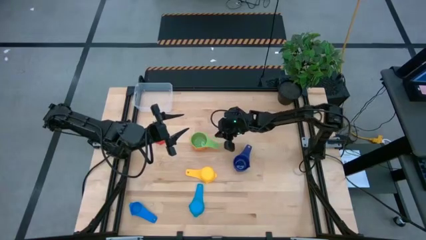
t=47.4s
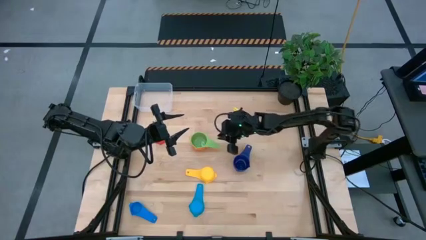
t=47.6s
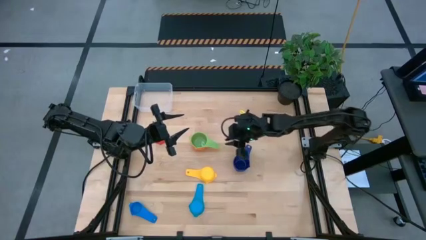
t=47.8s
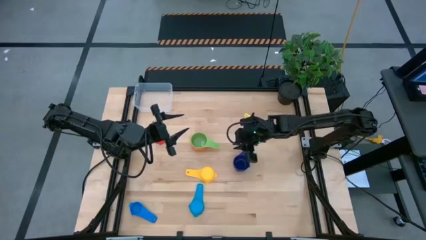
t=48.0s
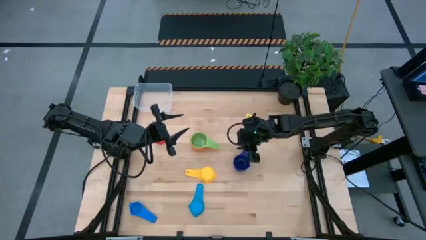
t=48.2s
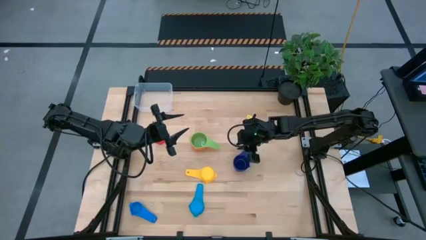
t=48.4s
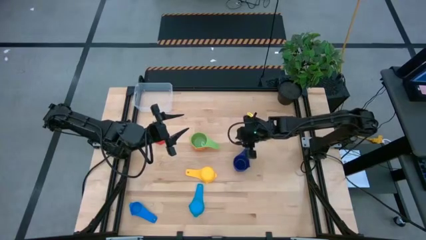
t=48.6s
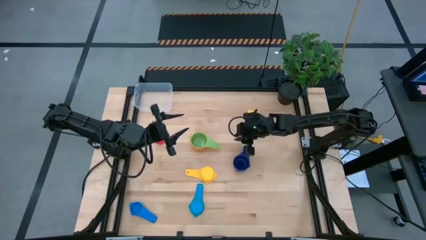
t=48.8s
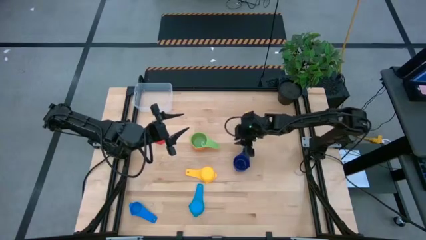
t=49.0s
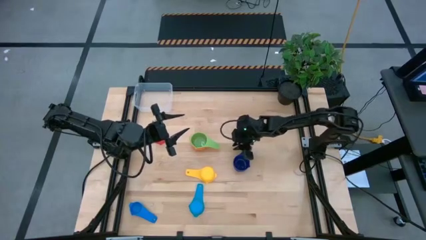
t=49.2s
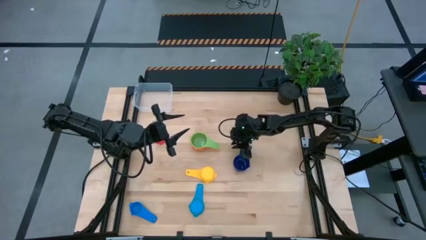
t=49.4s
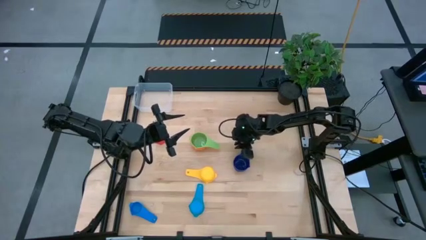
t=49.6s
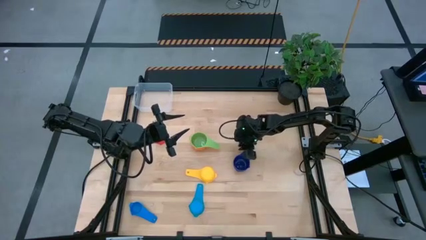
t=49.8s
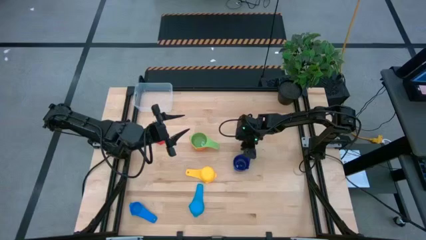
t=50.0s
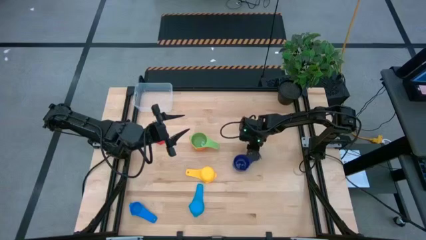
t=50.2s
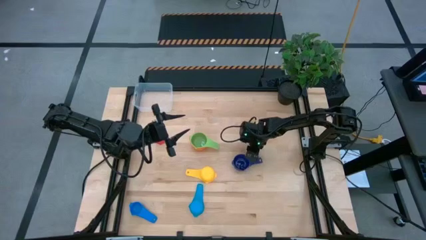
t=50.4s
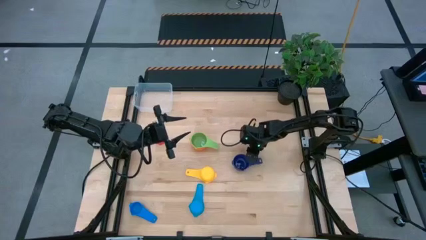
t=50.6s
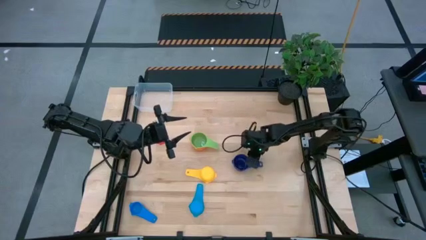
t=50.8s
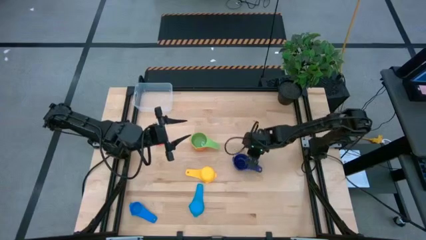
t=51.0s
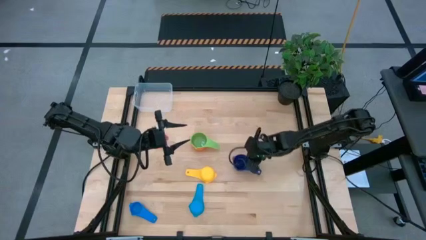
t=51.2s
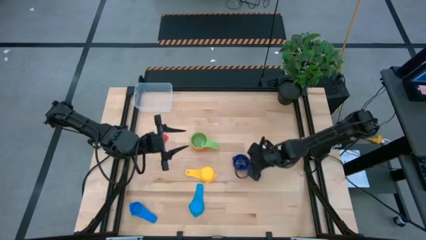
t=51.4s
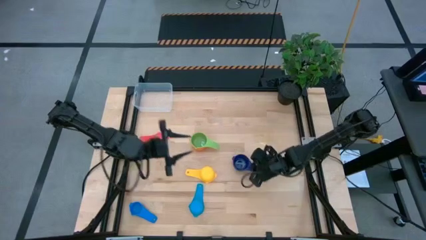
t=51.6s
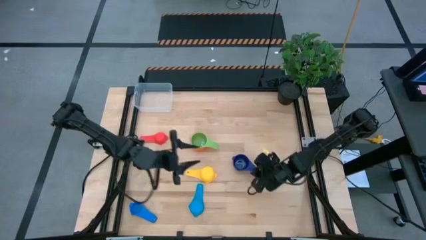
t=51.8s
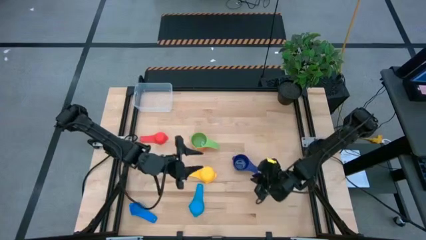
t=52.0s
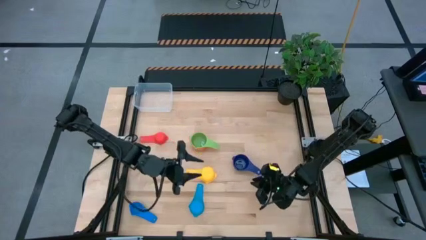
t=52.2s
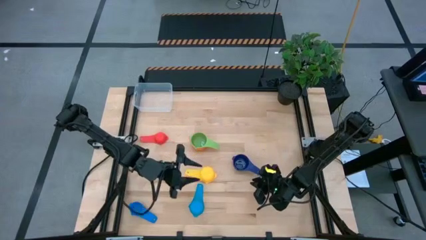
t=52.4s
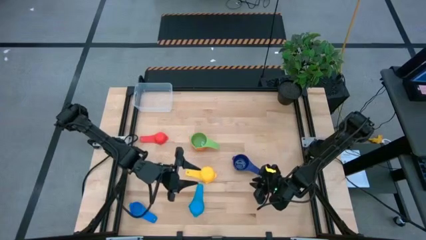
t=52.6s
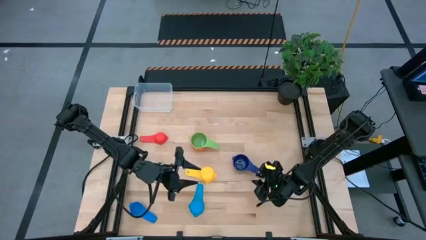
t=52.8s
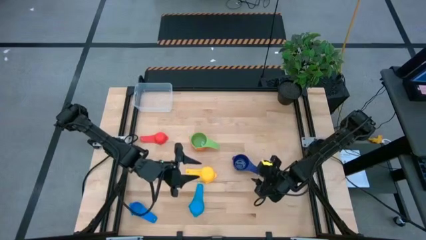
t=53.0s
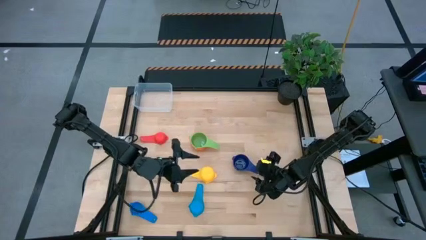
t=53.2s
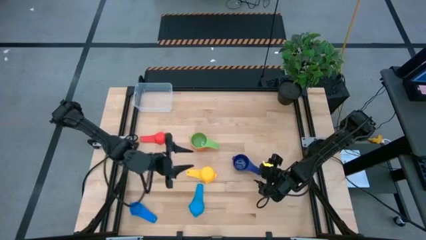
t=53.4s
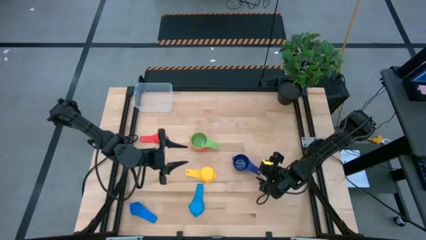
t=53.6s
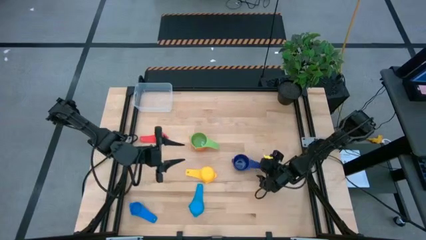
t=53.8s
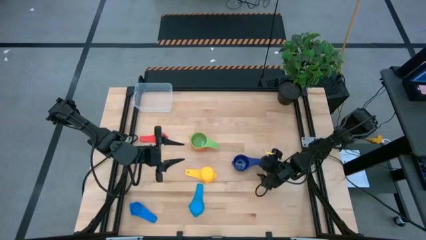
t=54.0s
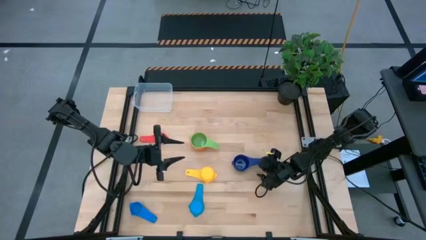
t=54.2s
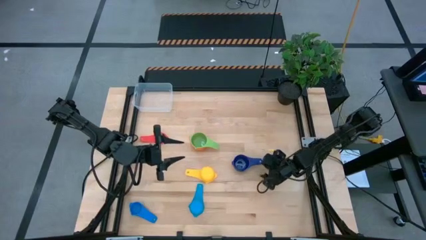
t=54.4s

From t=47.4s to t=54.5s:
Task: Nest measuring cups in basket
Stack the dark blue measuring cup on top of the green measuring cup

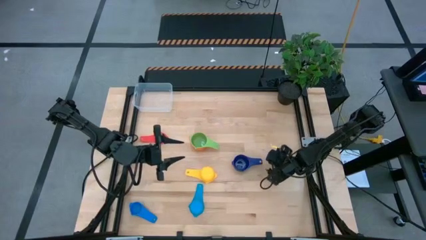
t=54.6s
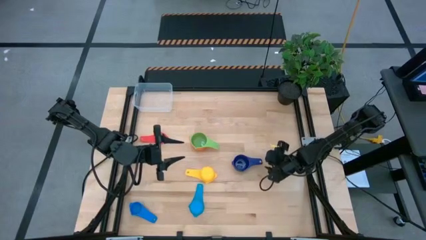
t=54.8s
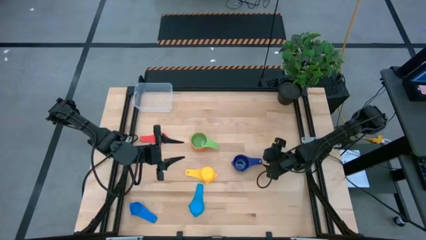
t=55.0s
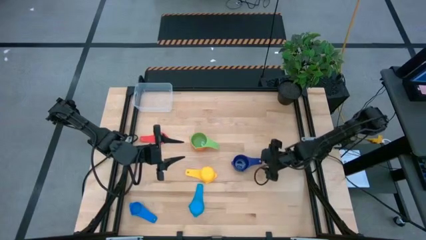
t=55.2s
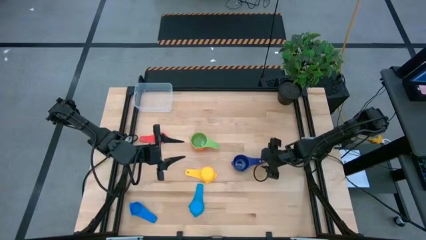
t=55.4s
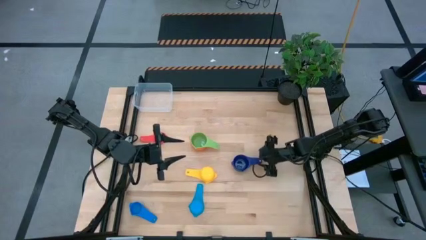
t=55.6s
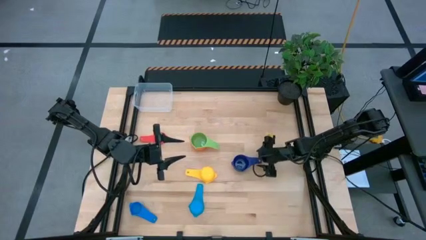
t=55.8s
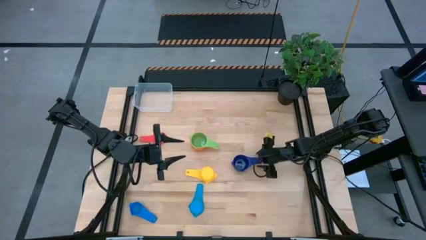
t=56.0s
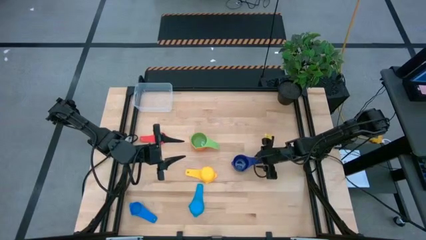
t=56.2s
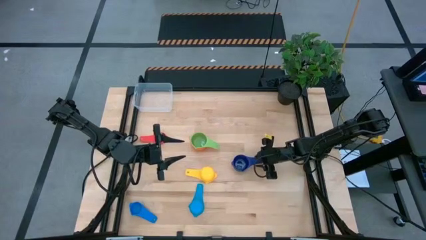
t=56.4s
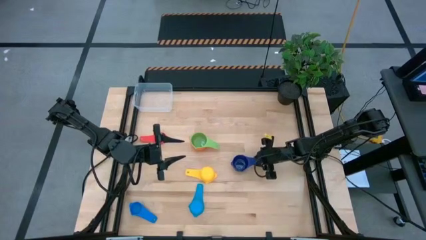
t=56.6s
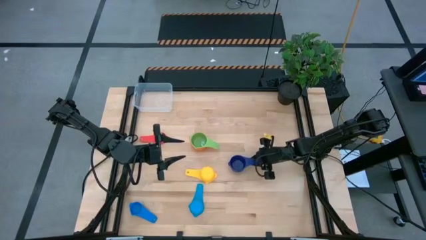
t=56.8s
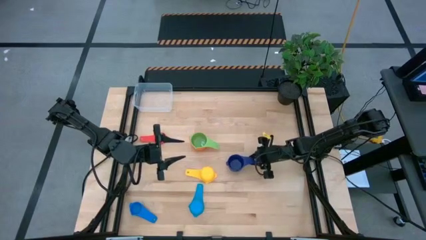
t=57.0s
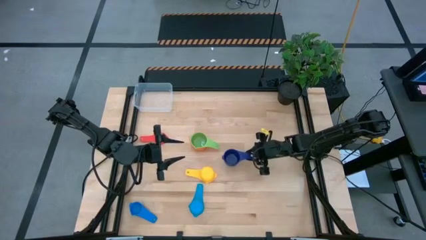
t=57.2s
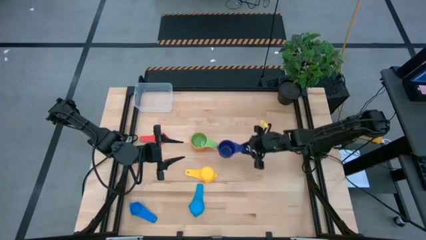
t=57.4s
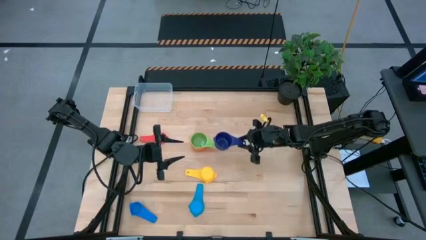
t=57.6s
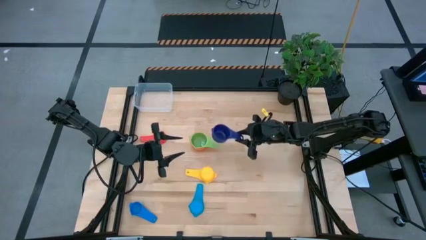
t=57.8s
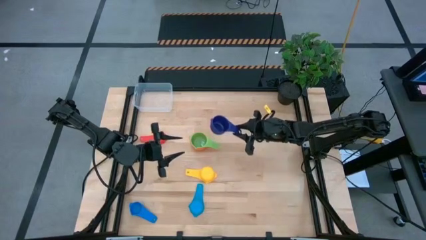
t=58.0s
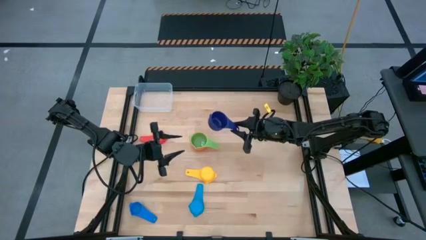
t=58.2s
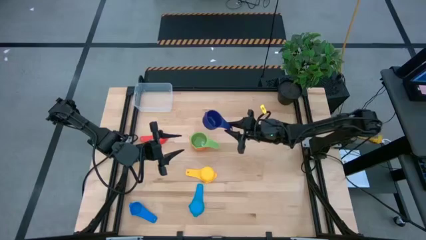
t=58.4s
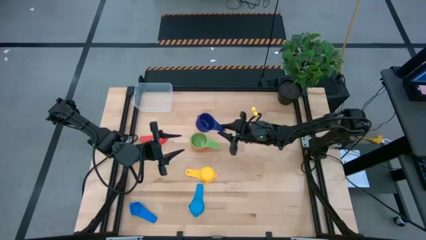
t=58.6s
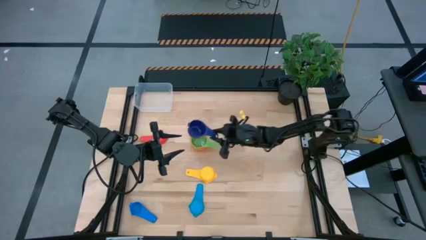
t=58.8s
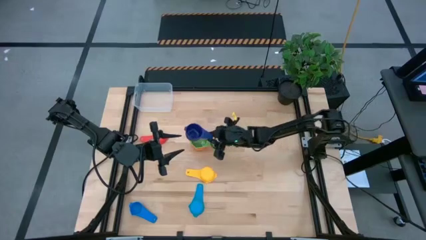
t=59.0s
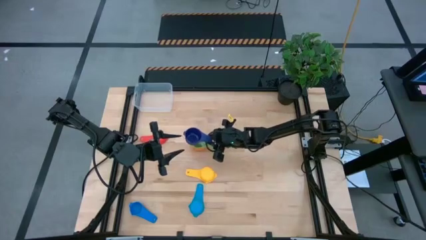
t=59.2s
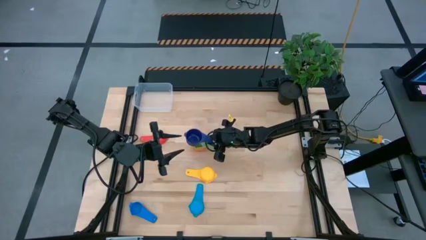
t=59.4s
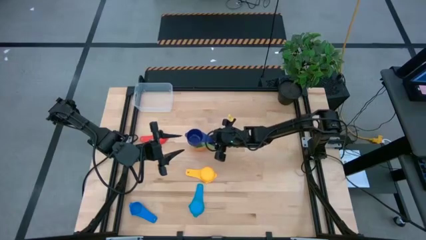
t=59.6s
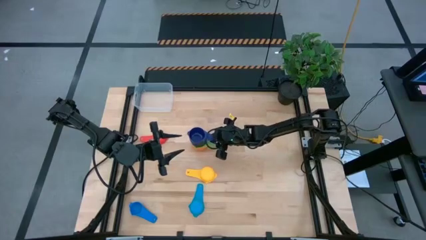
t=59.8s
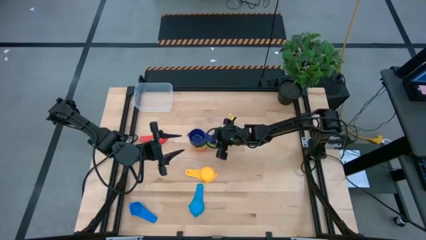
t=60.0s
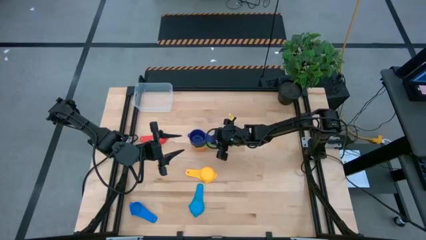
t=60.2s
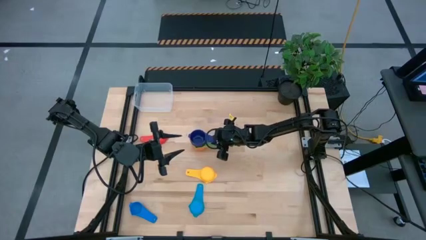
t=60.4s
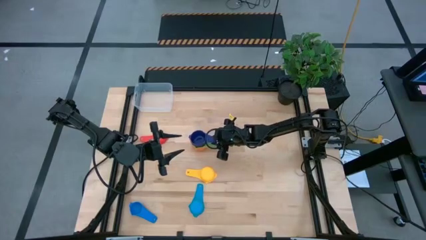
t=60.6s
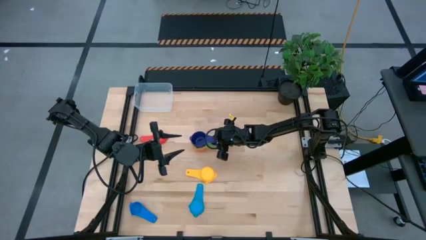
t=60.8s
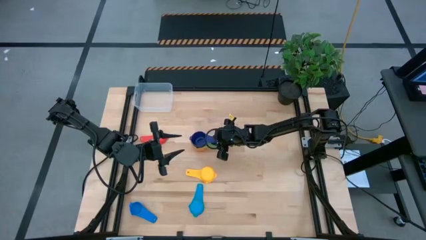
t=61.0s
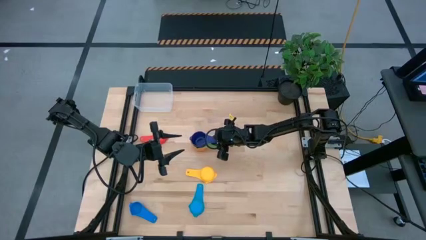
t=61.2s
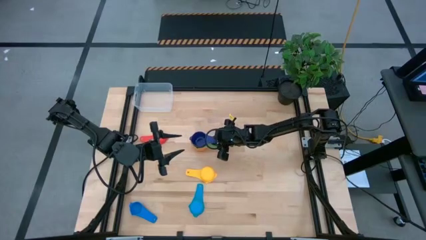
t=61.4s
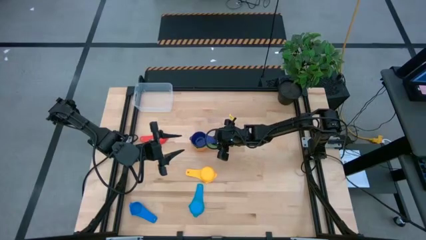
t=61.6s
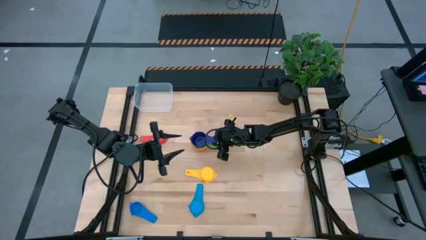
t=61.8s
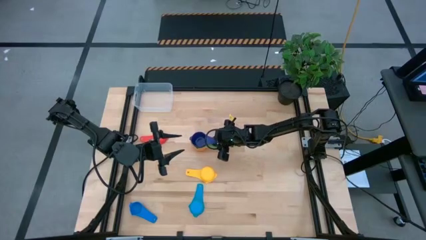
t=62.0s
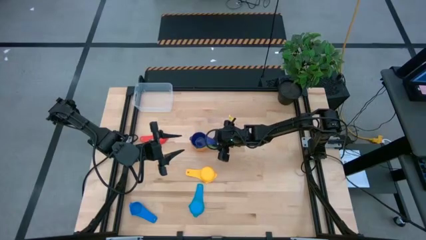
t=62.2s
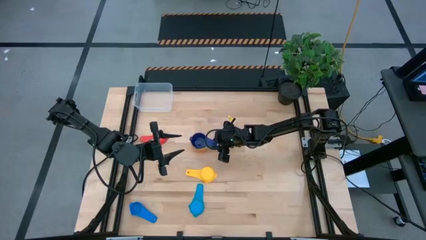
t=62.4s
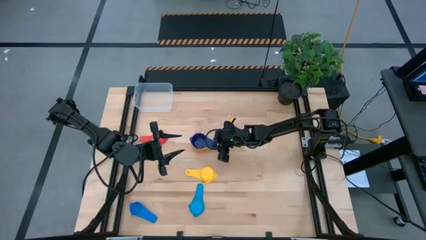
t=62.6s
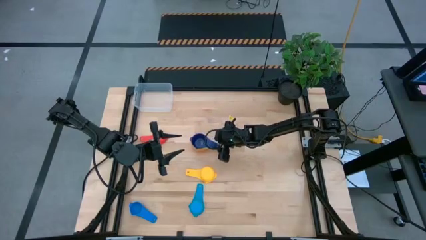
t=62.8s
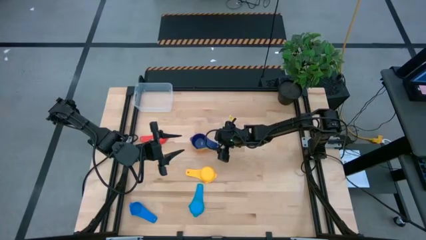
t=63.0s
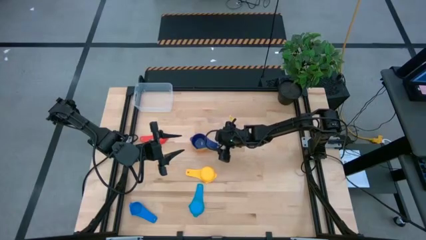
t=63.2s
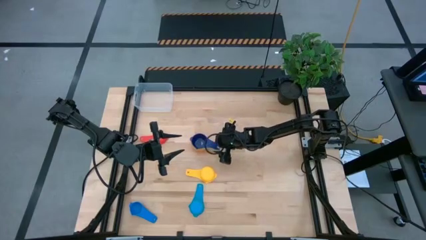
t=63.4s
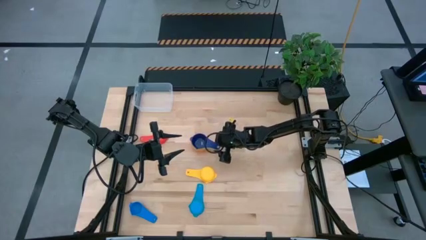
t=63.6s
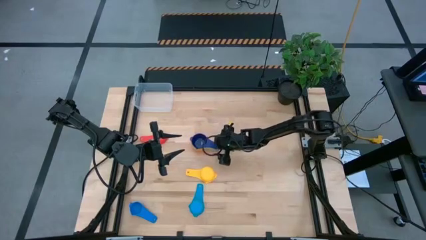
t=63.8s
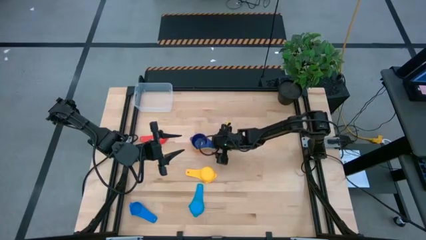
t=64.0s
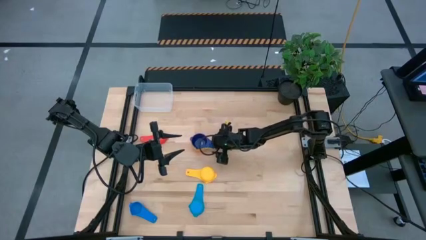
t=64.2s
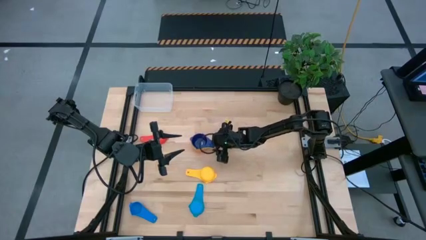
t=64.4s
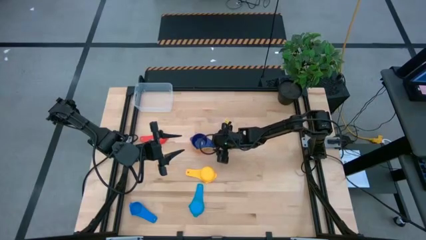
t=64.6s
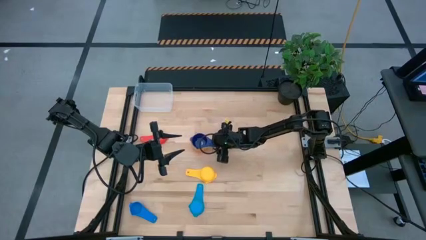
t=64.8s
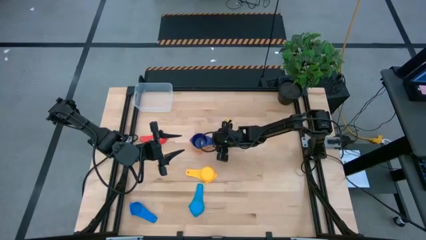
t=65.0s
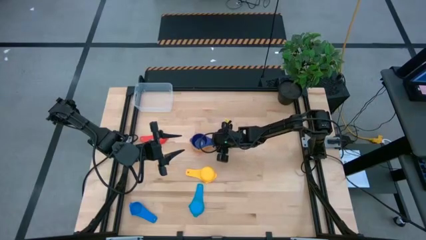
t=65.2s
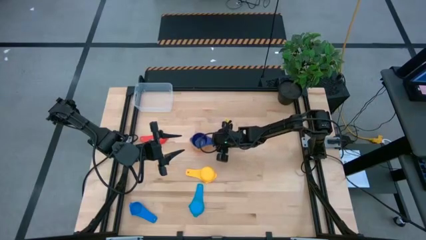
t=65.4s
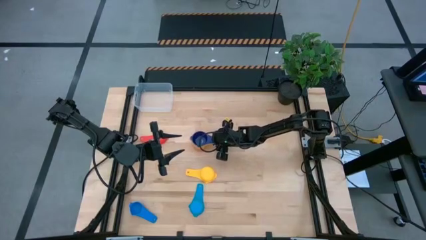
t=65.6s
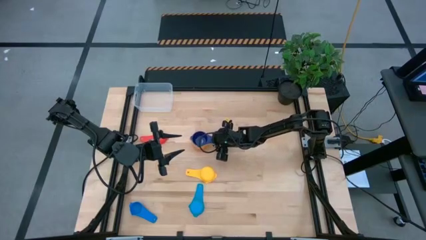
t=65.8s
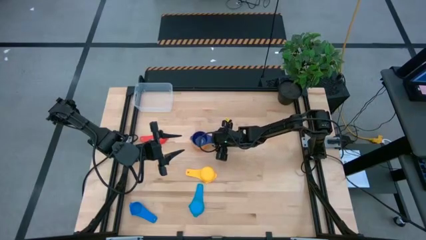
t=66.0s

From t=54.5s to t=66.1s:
Stack the dark blue measuring cup on top of the green measuring cup
